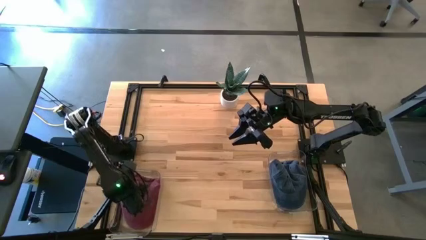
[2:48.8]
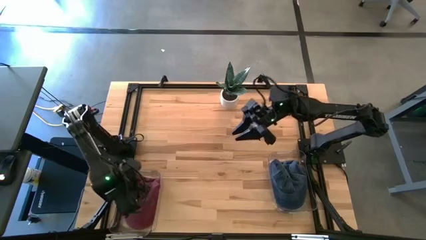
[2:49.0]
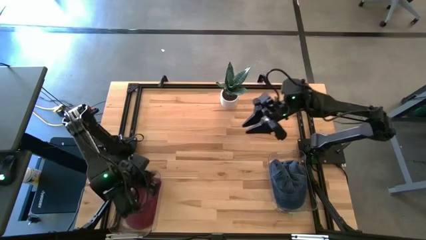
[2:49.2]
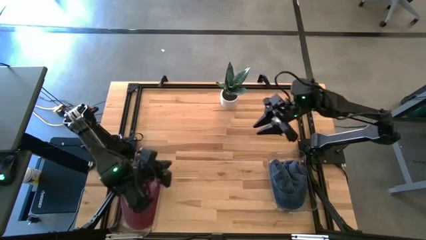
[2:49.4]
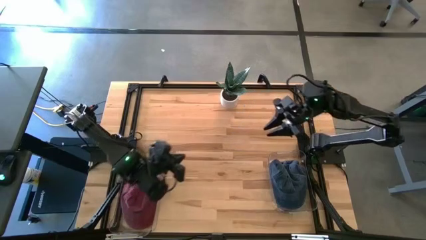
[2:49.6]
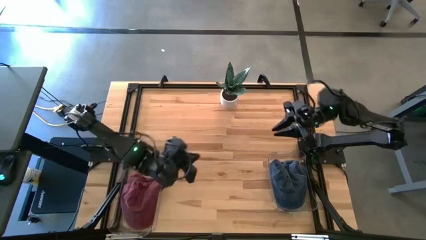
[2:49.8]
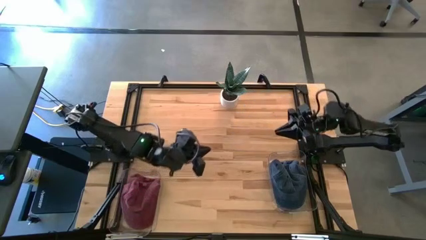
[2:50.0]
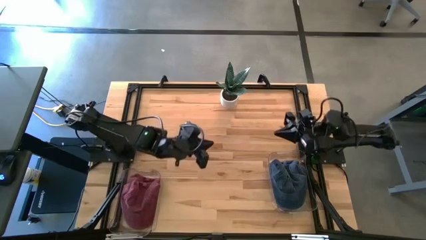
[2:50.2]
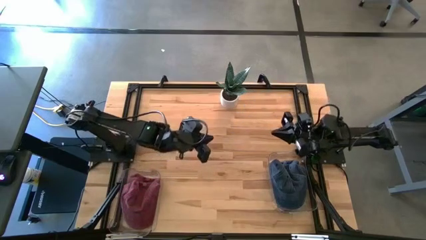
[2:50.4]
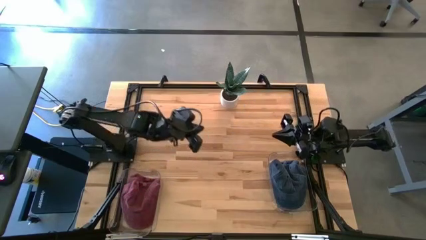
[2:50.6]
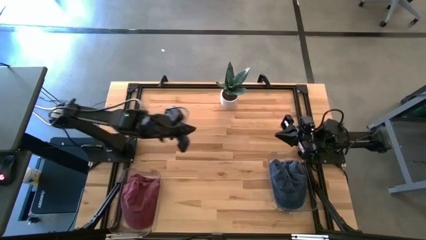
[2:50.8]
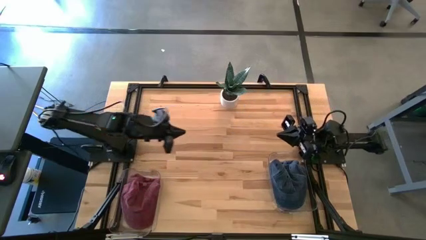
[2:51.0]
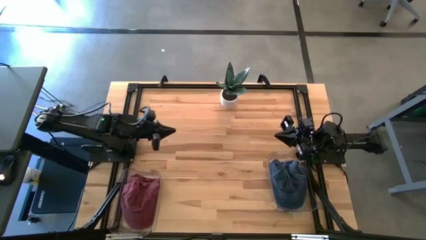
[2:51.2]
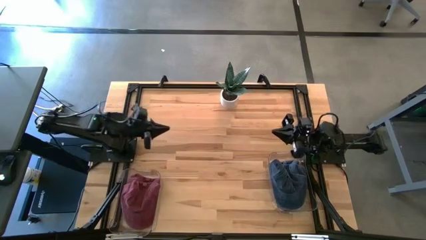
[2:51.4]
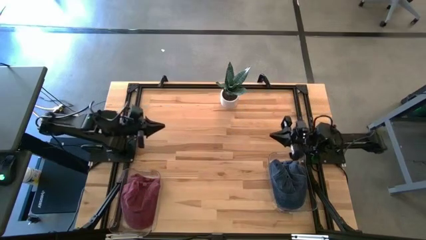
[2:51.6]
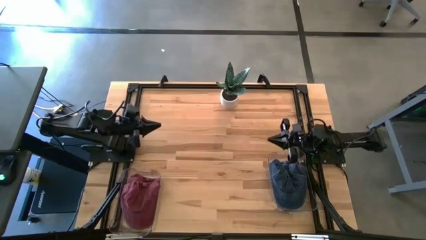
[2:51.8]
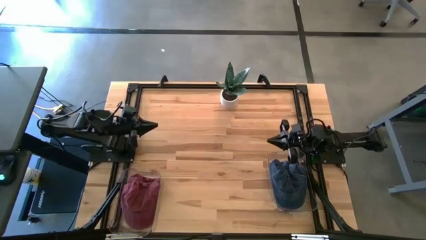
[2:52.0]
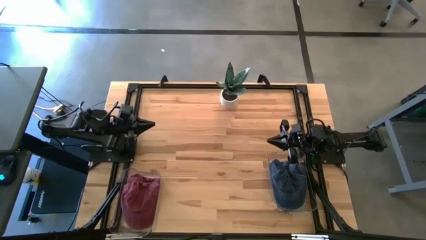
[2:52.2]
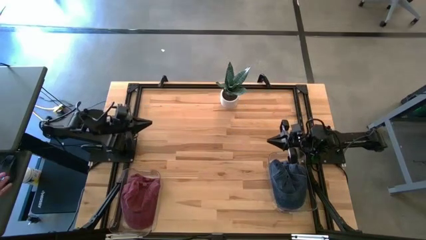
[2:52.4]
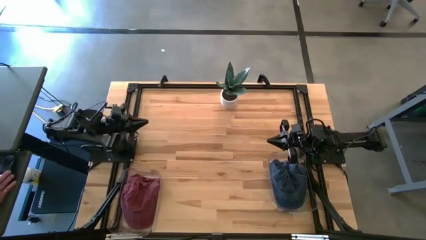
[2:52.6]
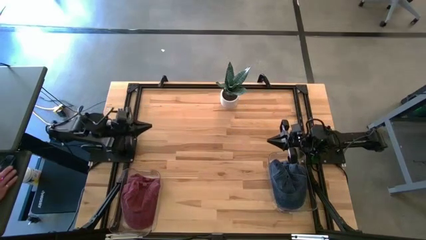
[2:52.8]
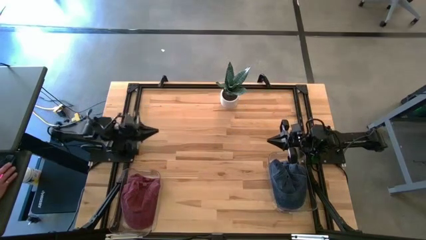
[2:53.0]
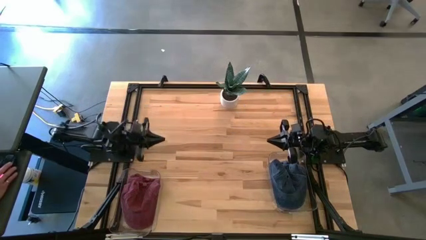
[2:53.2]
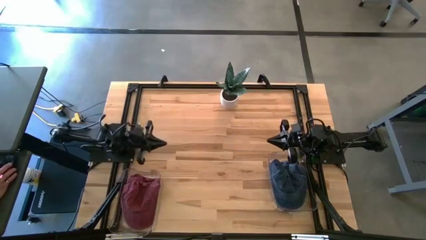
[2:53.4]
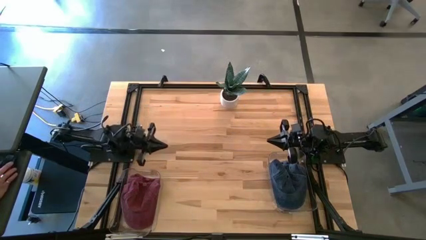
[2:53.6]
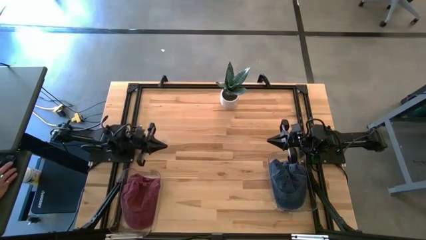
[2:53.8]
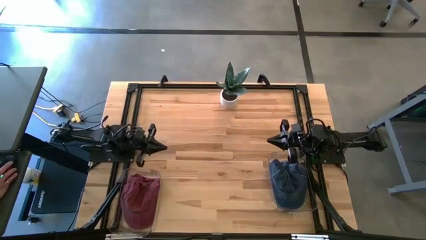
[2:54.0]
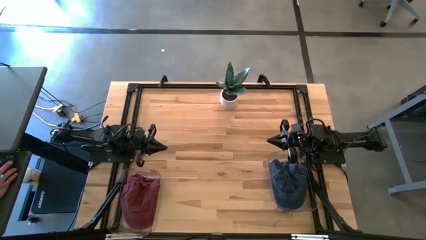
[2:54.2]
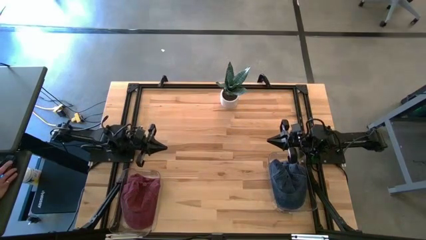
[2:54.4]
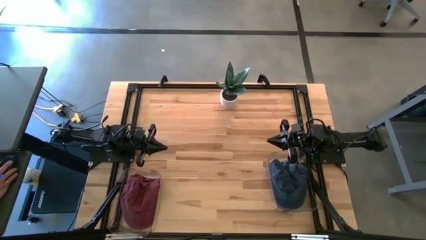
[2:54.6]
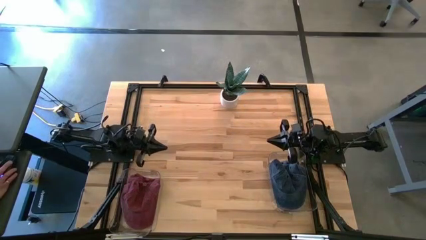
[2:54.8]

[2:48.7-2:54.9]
Task: Pick & Place hat
Return to Home Position

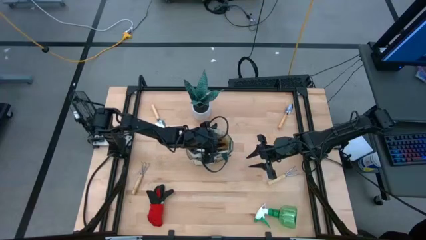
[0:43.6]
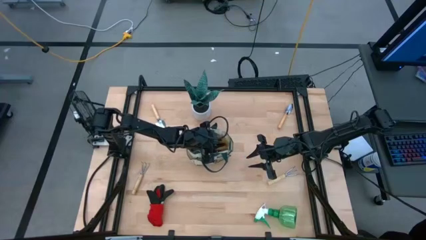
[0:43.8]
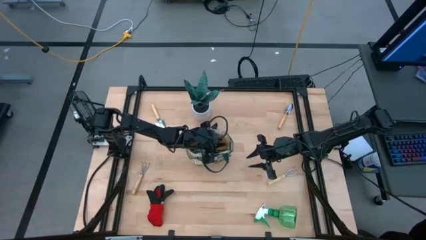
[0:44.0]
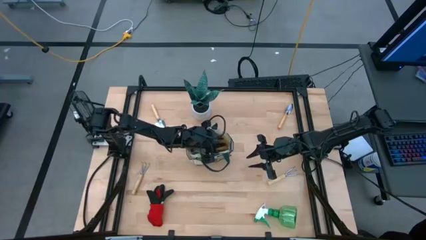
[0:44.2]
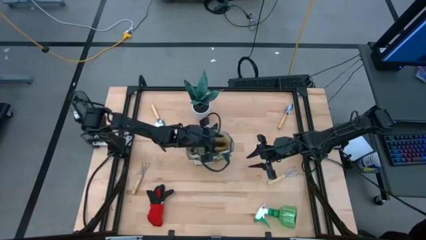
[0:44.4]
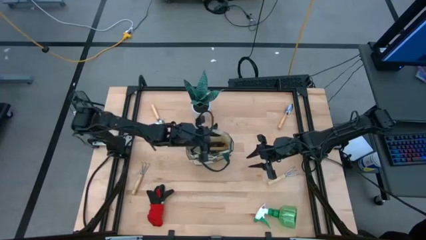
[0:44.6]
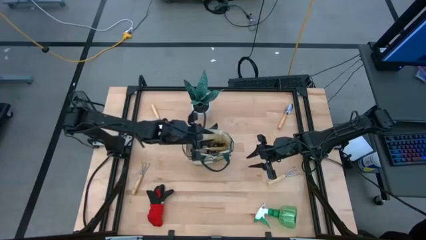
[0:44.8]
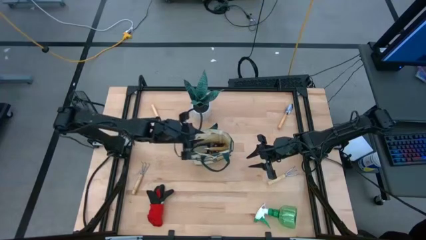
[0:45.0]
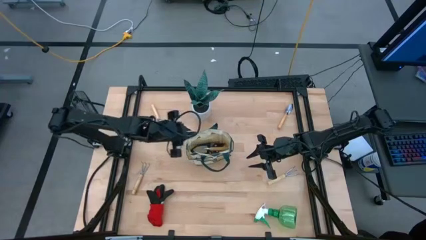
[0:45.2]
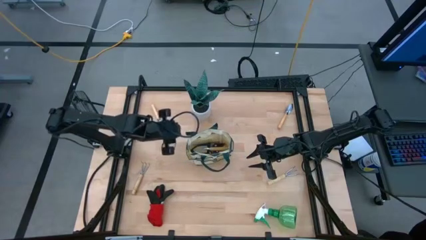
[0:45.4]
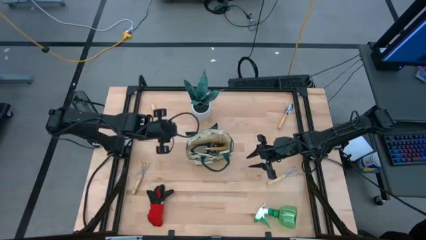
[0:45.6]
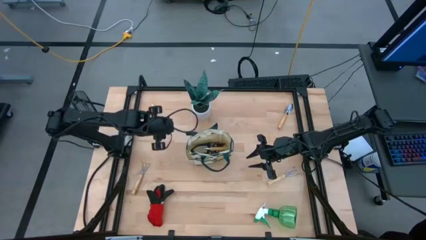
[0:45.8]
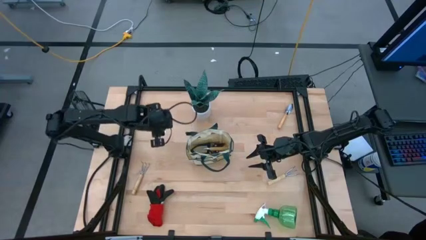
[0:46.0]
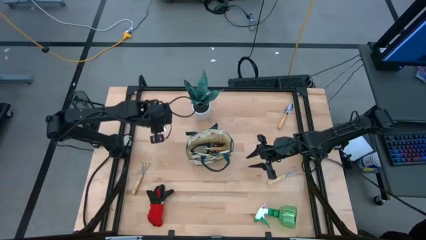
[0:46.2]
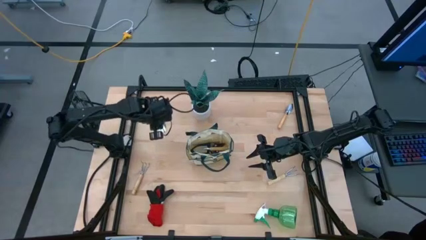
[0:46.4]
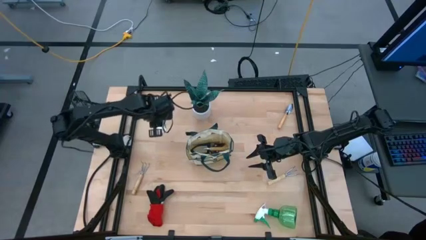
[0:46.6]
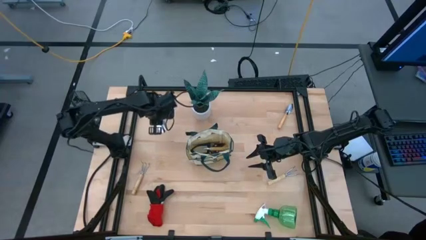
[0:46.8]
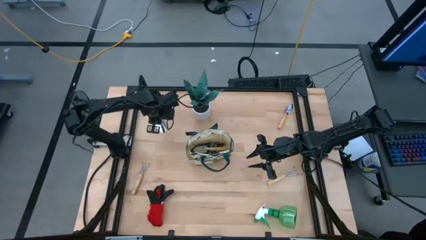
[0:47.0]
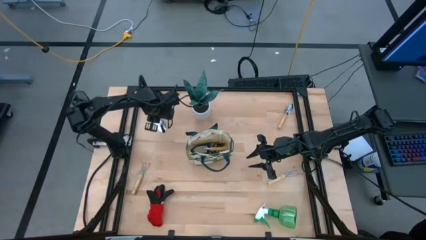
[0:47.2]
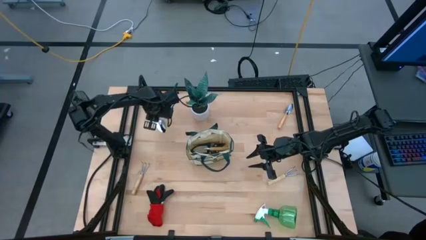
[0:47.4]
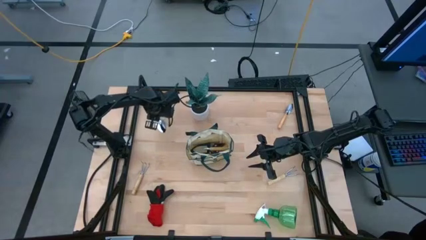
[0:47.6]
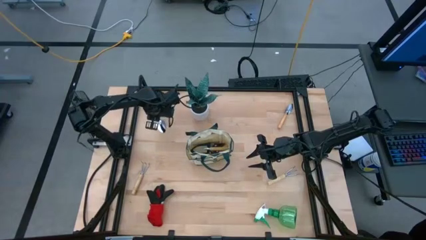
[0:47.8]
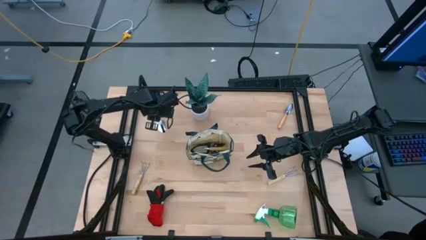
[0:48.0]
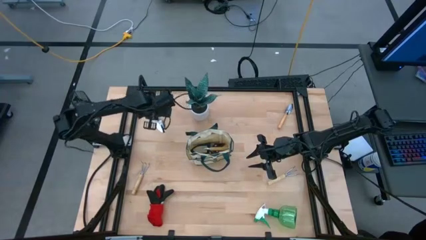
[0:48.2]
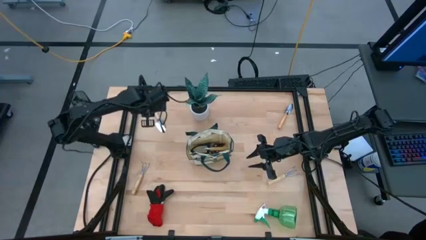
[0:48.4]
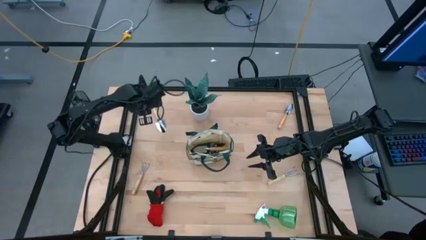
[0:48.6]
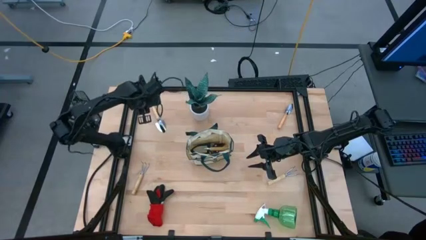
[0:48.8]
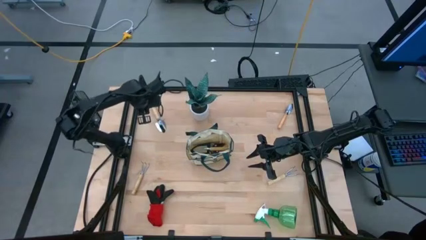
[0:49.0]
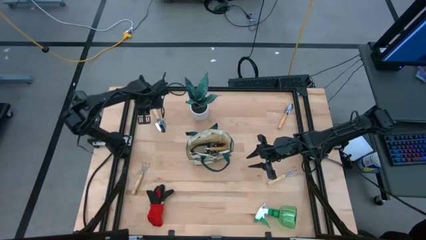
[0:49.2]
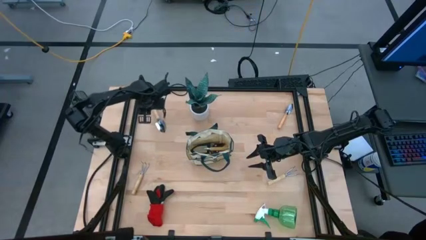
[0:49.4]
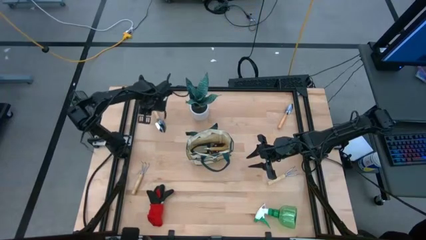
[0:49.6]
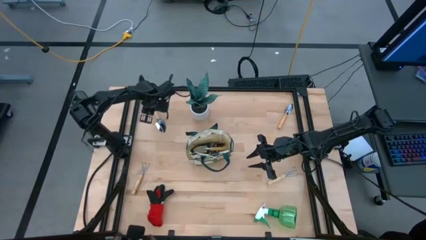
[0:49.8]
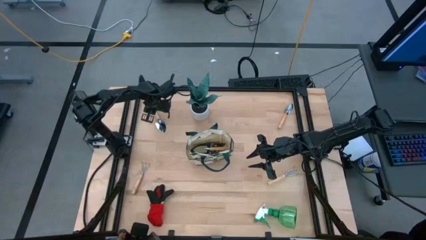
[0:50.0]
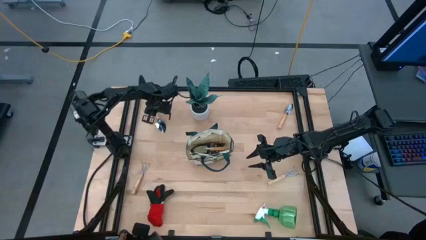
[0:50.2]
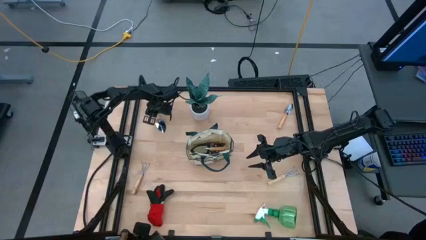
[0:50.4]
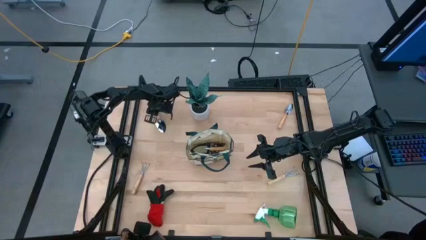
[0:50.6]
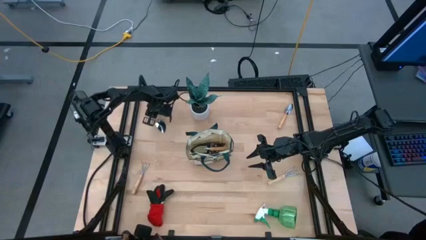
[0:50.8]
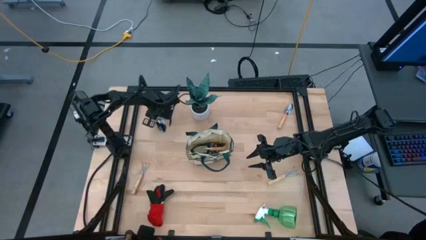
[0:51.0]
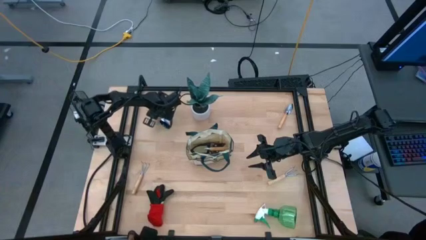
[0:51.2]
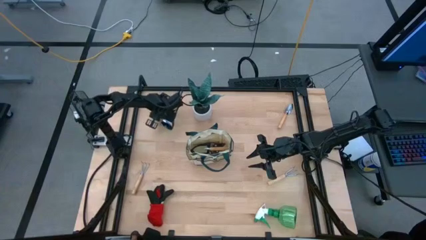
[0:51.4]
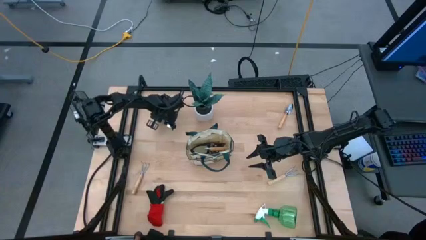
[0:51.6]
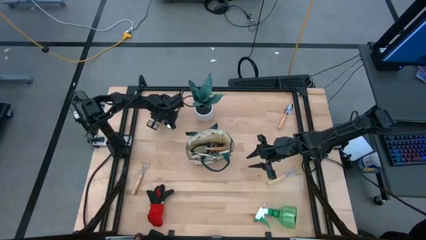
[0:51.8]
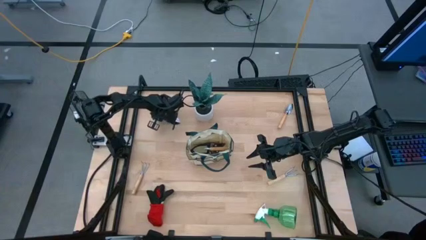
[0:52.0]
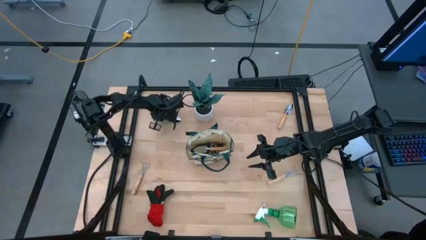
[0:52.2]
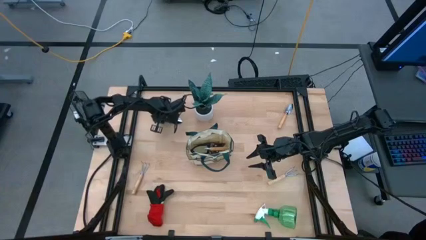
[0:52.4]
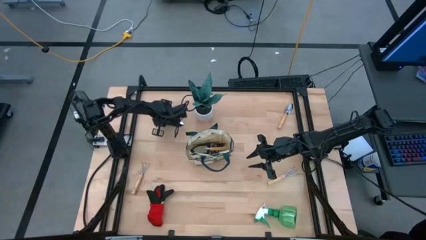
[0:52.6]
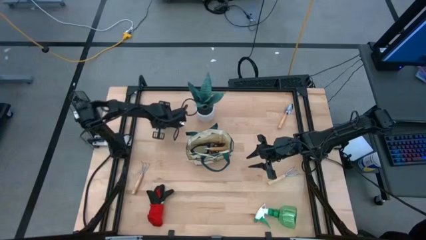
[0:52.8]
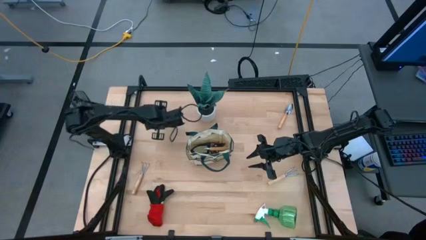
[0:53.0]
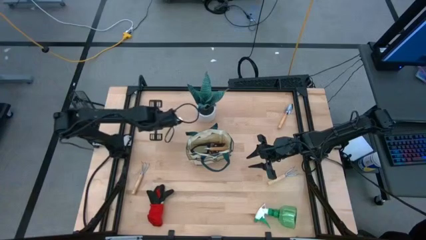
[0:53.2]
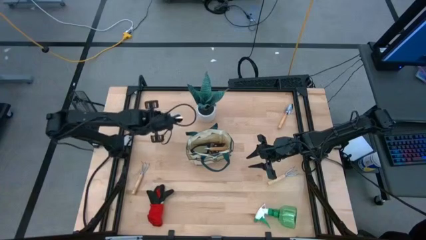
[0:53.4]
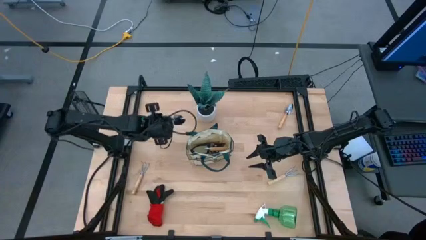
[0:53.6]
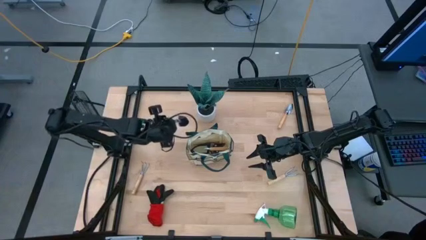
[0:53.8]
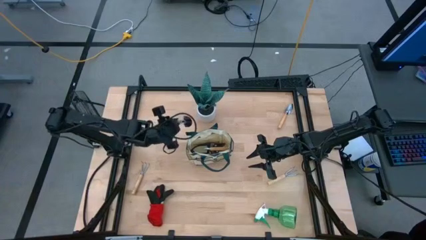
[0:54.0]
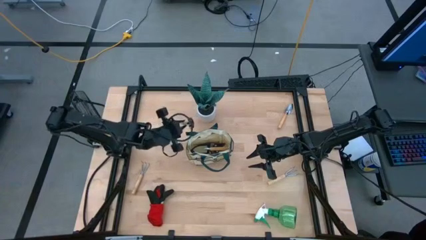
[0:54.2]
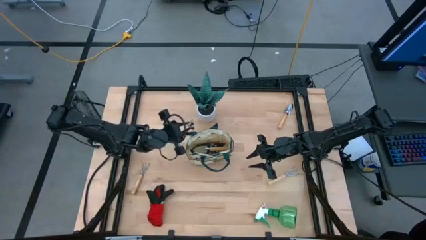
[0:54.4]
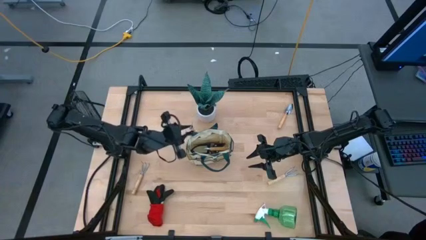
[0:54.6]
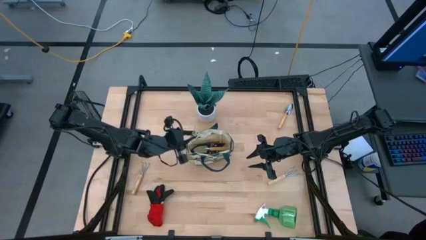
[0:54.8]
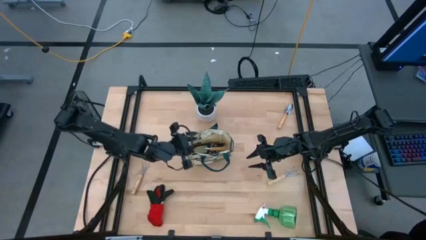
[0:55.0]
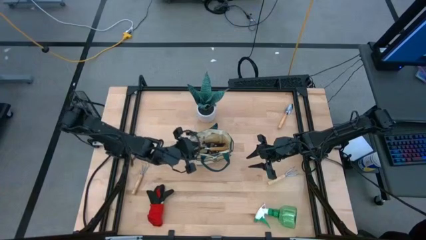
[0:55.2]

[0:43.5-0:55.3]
Task: Pick & Place Garden tools in Gardening bag
Put the left trowel into the gardening bag
